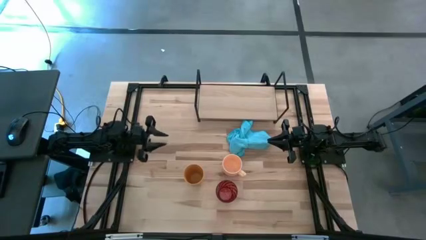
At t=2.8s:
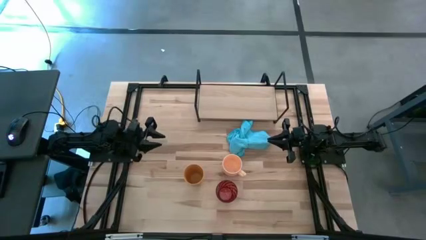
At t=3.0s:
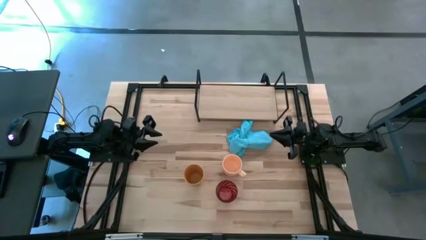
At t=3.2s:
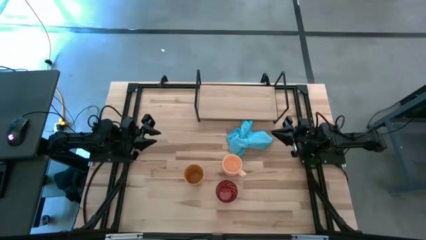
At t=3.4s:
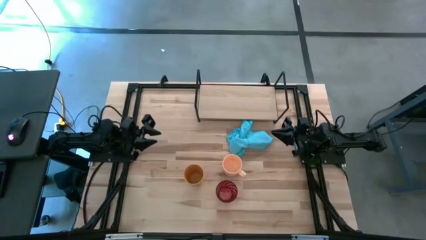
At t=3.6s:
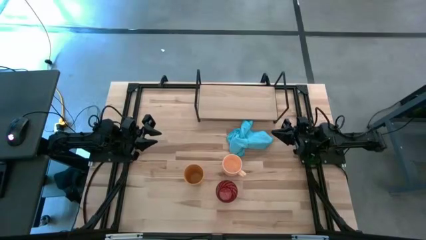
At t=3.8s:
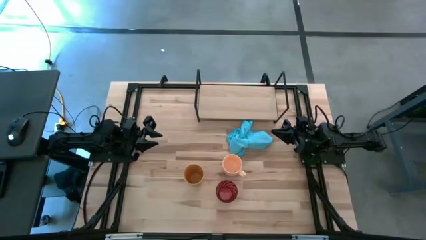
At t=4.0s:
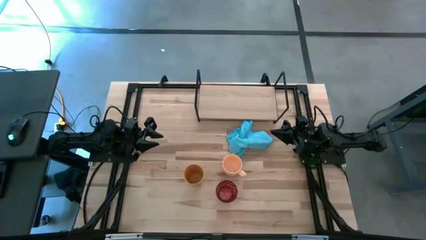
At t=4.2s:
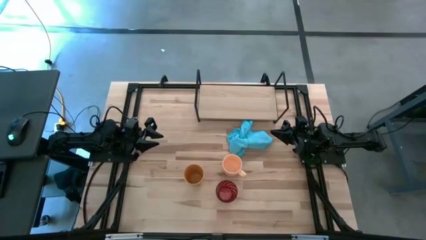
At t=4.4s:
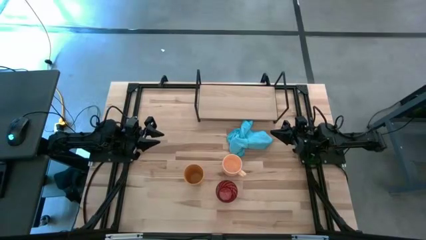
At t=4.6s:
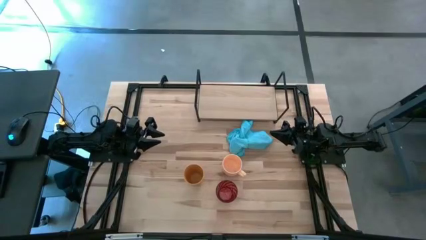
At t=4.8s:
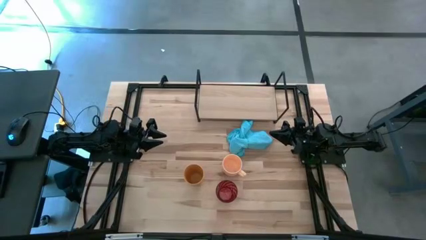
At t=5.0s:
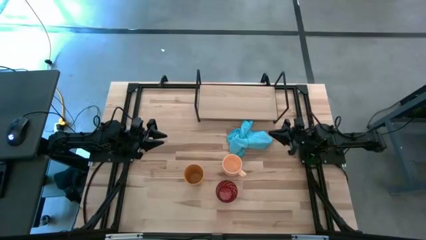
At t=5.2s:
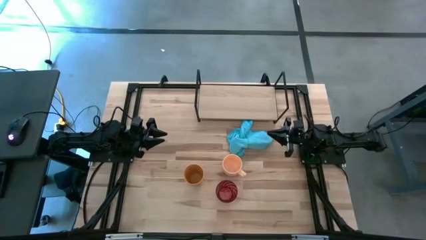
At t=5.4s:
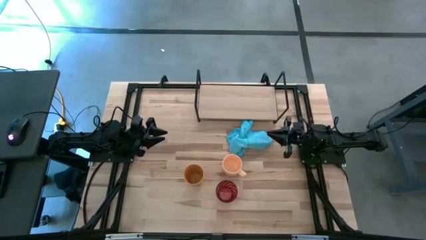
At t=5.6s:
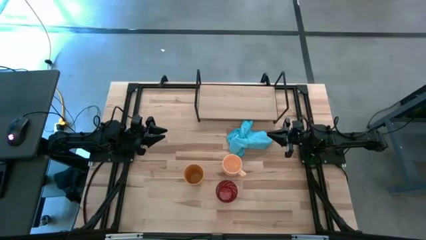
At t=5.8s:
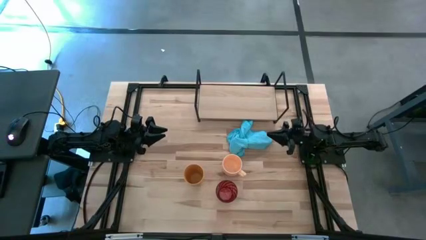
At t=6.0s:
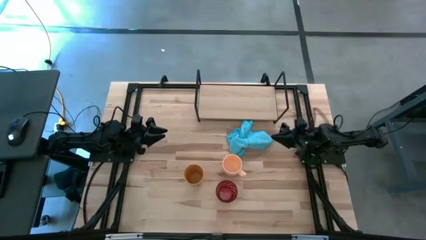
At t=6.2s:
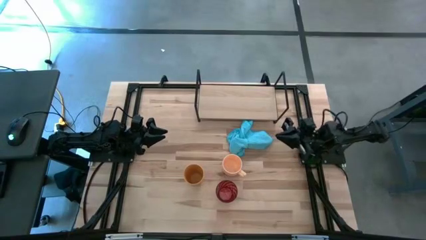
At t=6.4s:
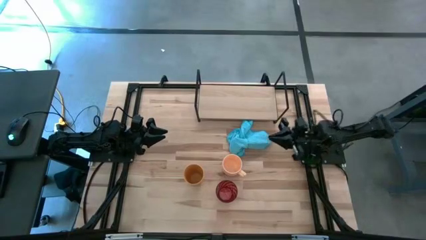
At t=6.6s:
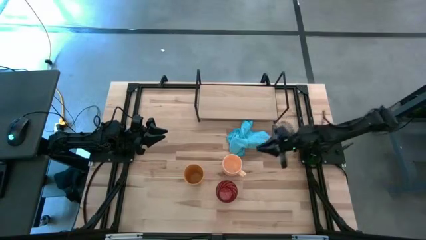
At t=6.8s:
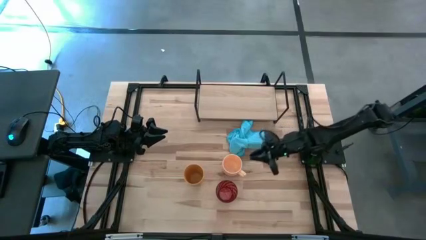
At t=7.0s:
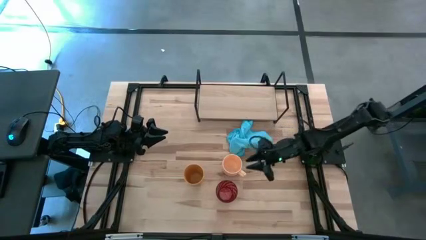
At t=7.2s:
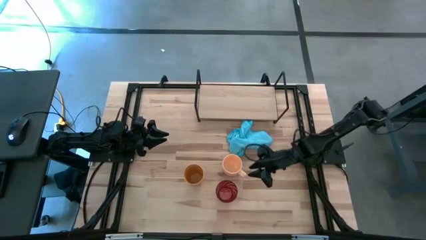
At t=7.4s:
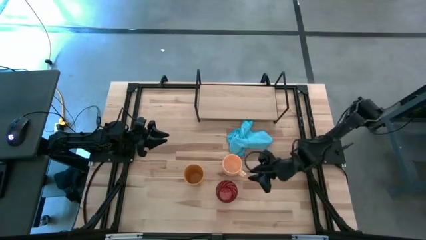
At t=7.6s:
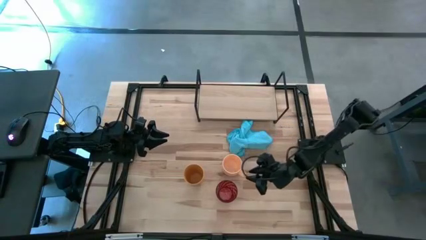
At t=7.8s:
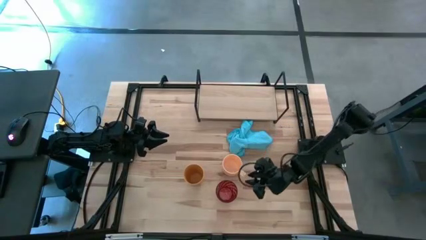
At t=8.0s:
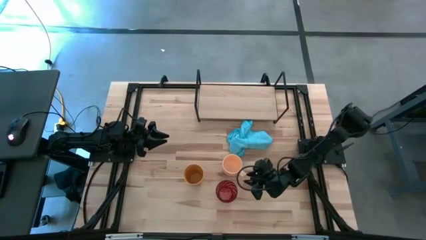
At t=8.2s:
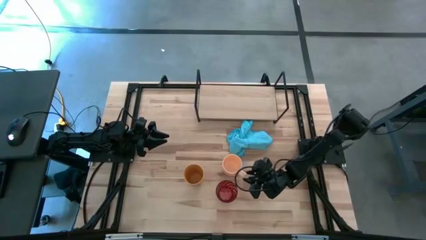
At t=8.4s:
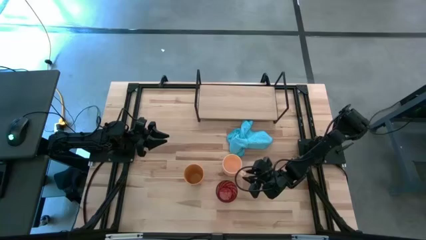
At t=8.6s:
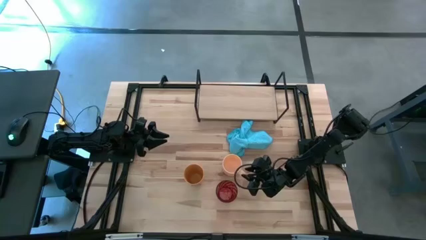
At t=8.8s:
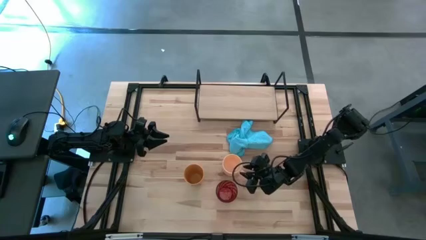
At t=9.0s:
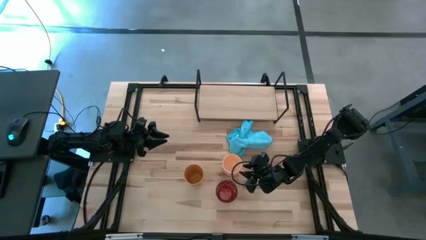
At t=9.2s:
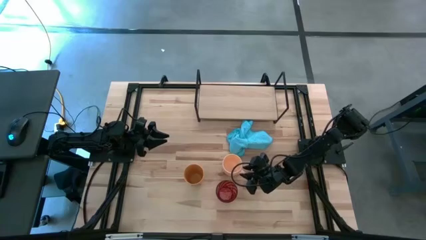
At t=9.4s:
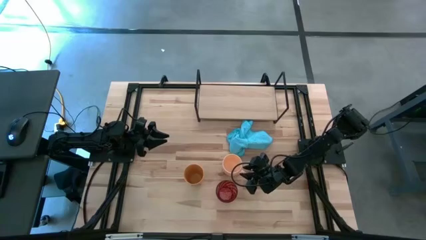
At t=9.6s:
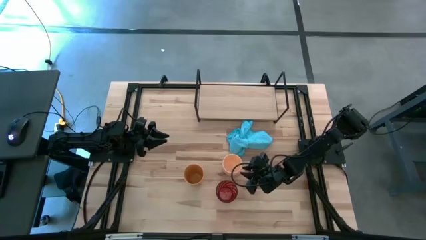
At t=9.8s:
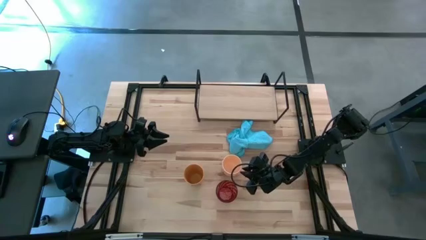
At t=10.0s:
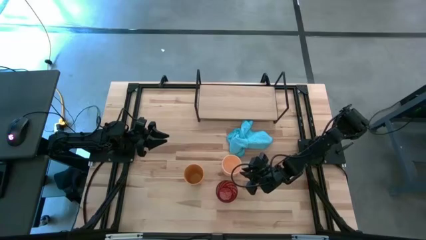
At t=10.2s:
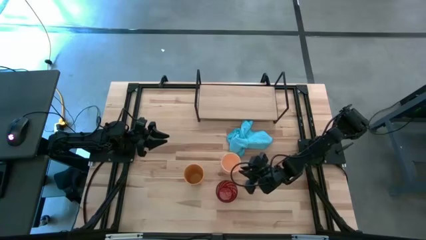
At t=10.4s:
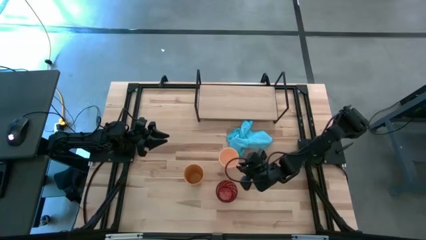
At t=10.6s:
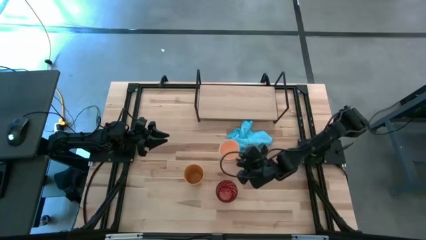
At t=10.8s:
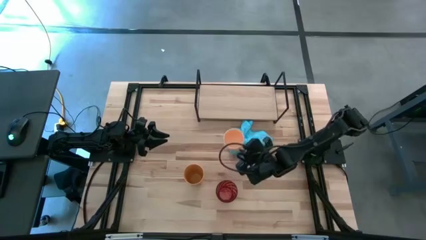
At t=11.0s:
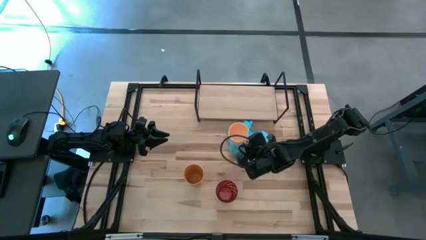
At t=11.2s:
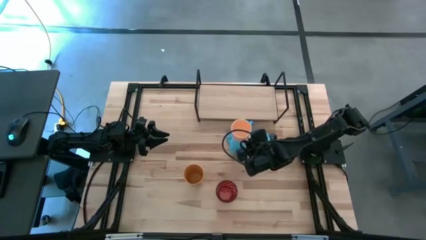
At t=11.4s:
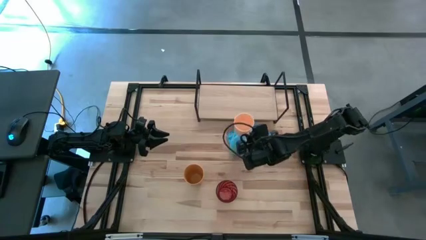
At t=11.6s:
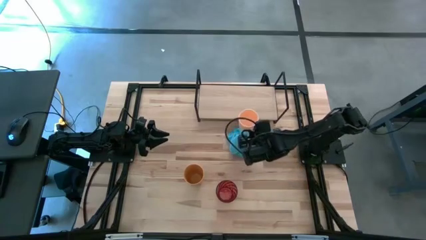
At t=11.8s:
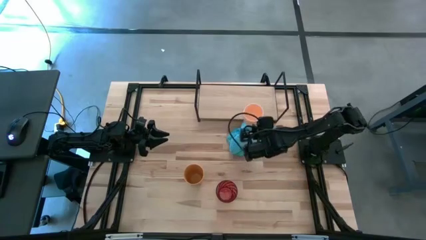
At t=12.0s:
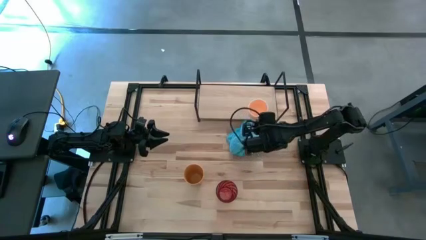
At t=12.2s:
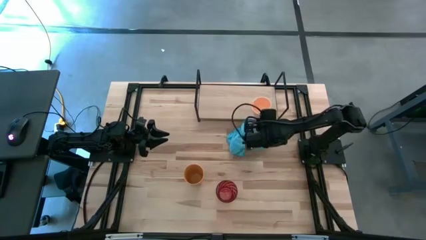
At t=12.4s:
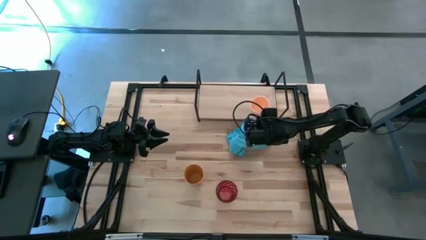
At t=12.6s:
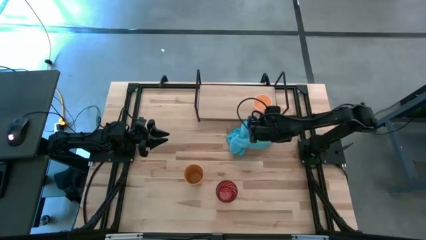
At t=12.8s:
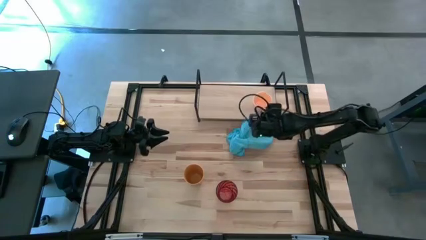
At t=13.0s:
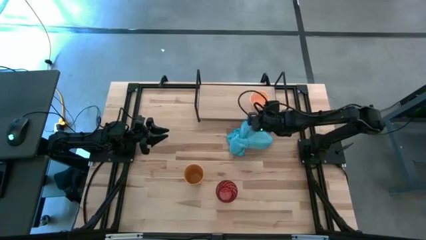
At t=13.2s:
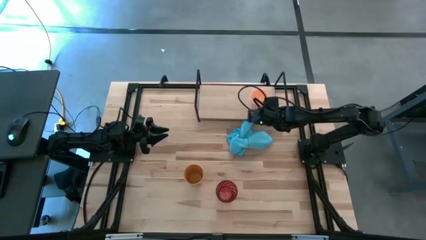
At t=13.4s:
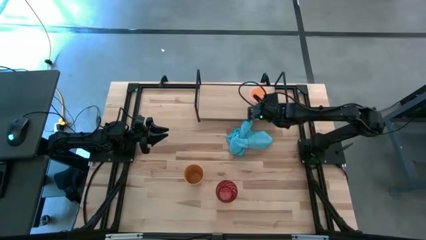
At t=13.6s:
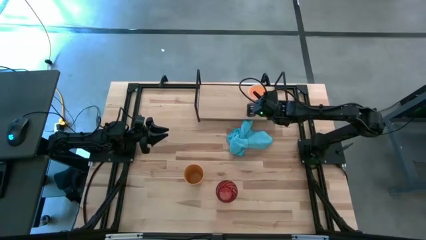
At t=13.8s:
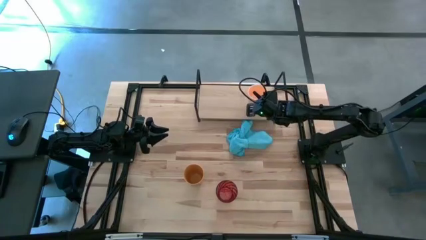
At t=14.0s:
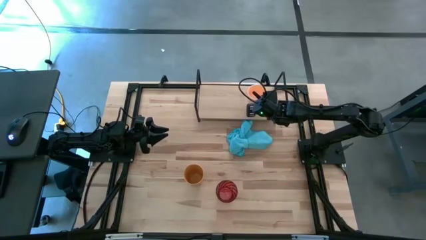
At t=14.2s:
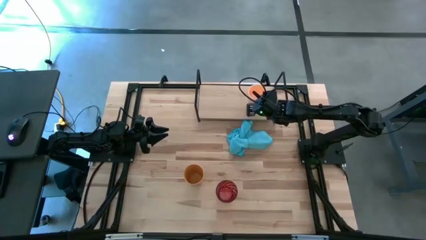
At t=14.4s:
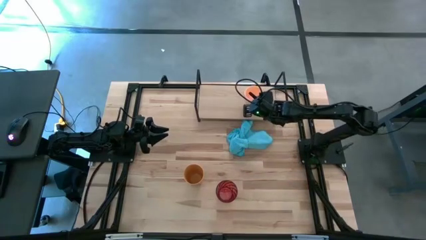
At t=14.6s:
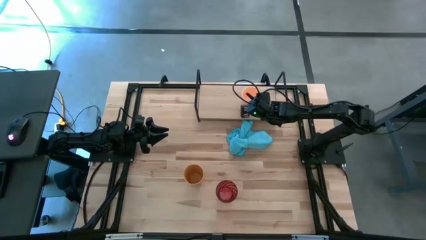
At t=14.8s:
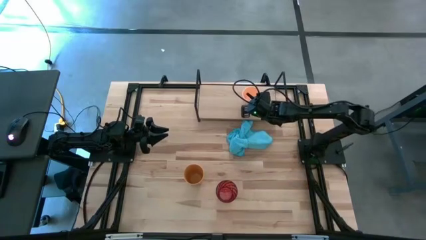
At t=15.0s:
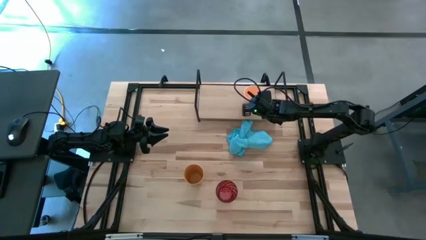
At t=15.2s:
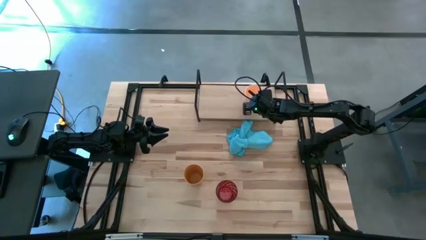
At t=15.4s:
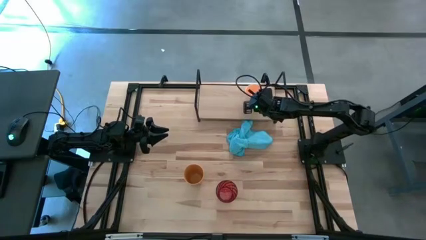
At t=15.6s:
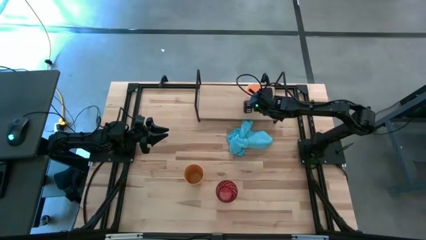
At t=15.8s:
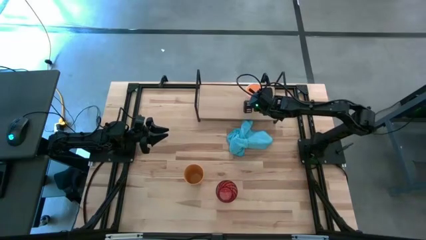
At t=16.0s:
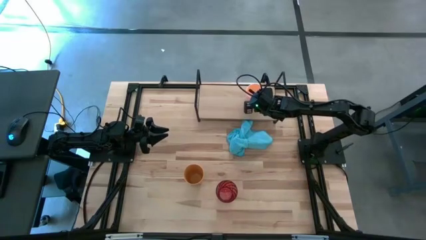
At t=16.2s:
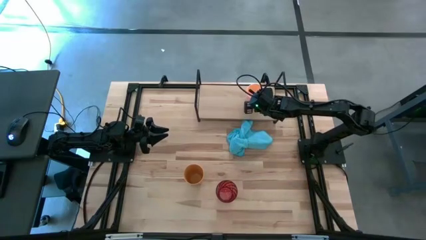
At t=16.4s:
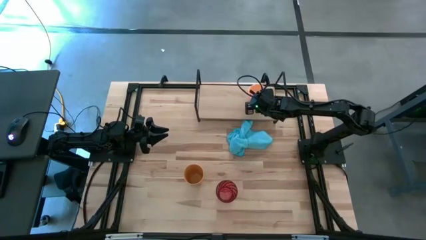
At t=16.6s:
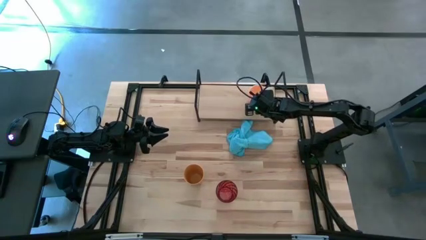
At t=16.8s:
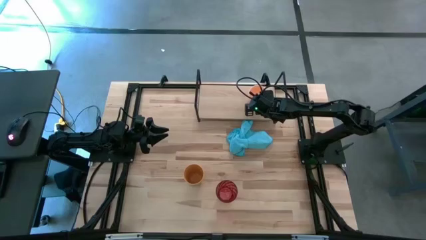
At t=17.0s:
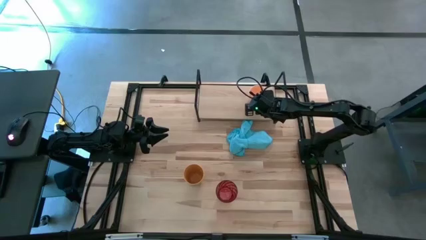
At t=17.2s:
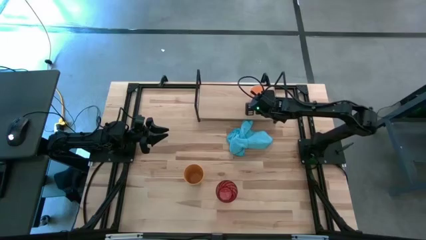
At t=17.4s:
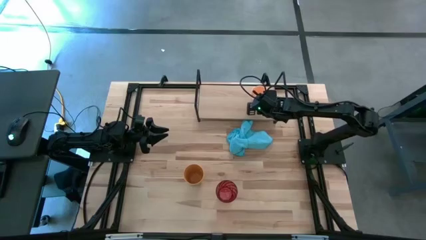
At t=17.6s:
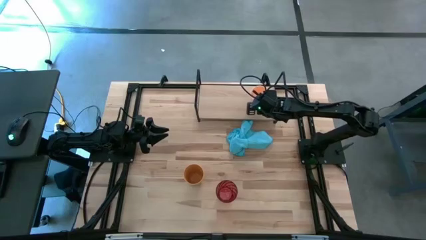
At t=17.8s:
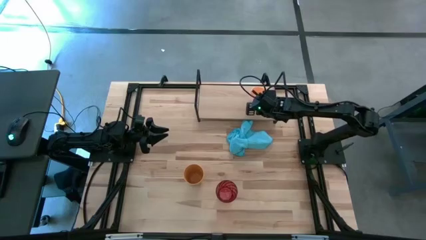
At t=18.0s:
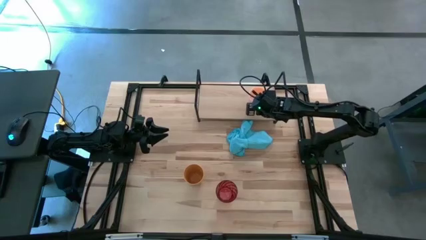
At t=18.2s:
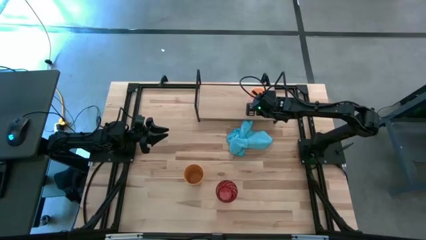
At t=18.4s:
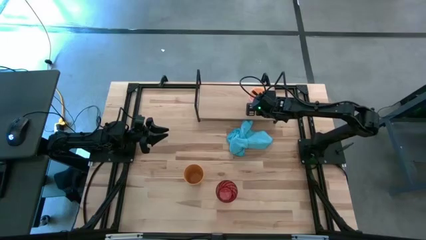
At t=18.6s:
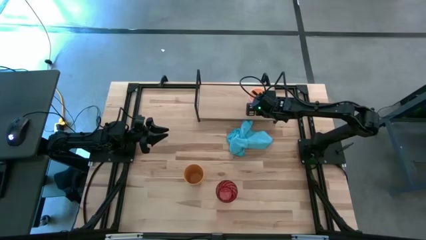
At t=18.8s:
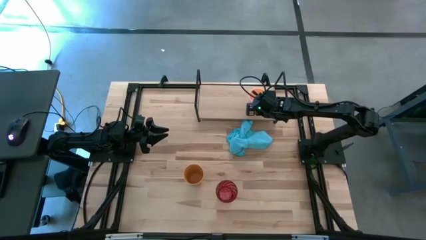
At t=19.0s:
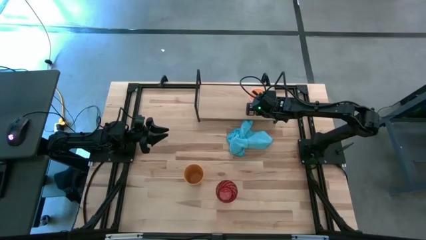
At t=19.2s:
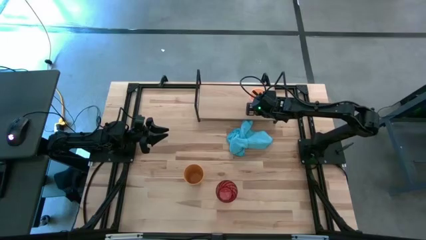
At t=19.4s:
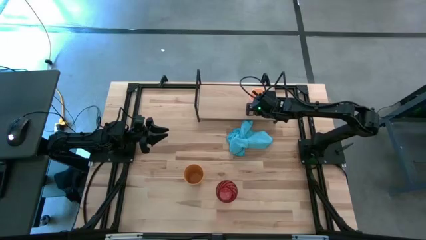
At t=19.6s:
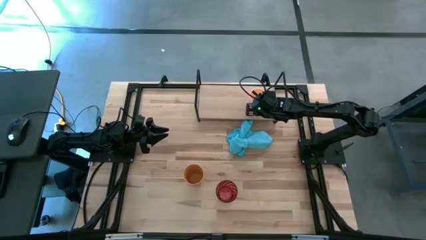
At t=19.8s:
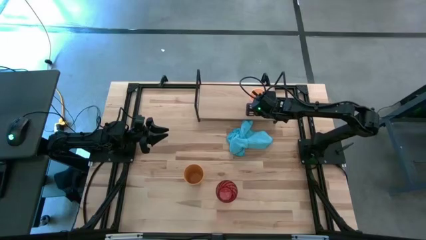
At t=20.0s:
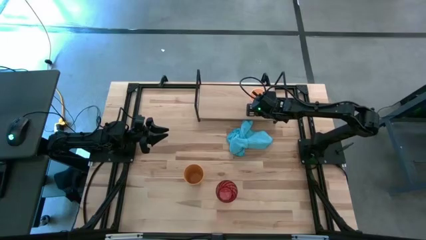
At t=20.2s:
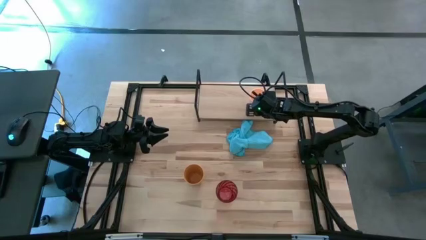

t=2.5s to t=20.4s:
Task: Stack small to large cups/mugs on shelf
Put the orange mug on the shelf
